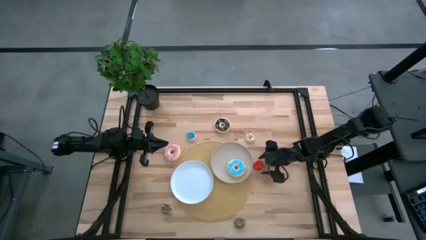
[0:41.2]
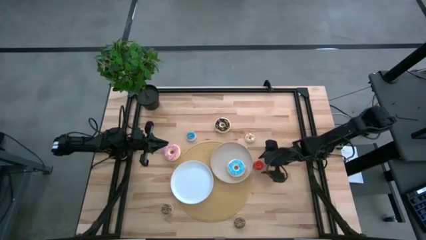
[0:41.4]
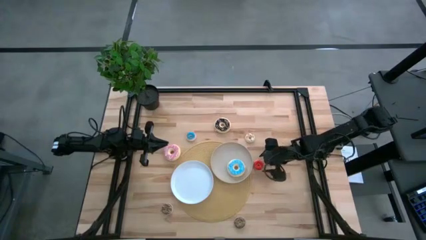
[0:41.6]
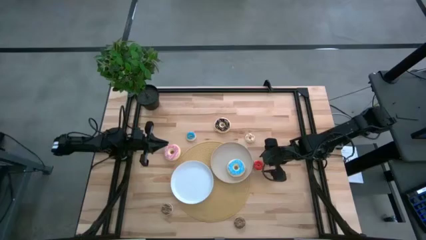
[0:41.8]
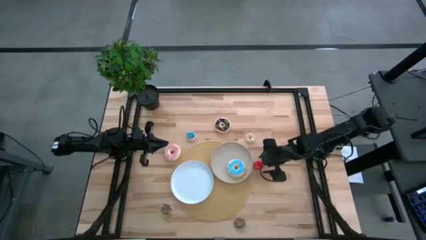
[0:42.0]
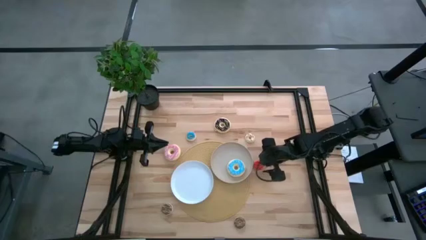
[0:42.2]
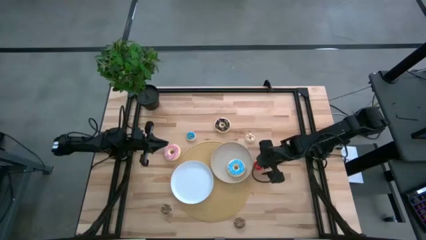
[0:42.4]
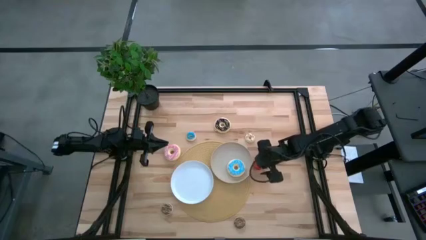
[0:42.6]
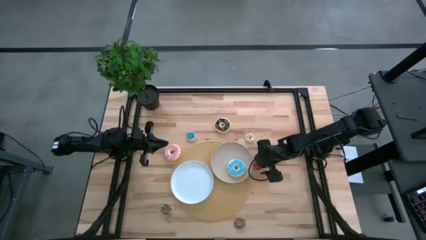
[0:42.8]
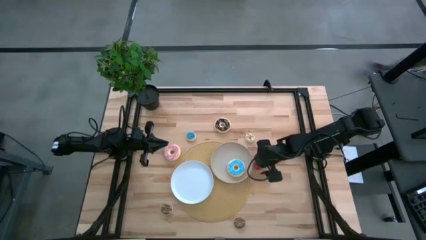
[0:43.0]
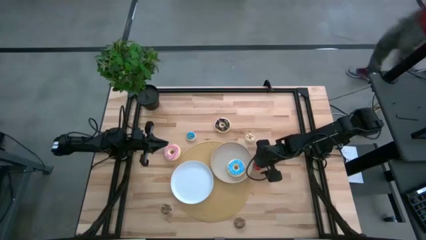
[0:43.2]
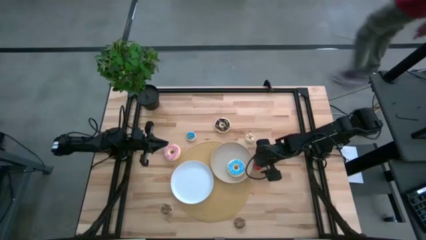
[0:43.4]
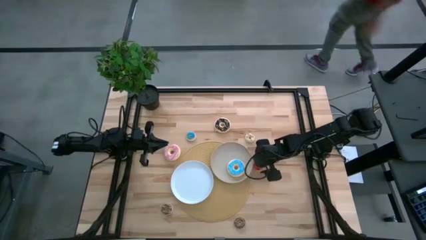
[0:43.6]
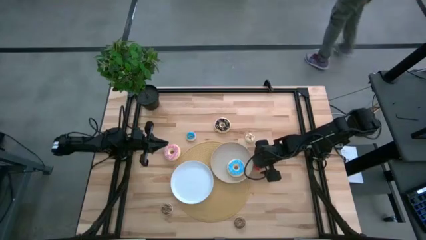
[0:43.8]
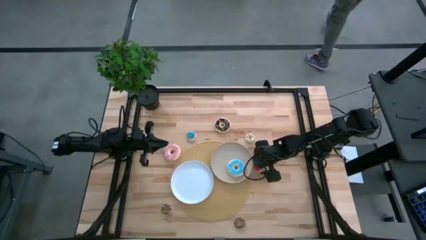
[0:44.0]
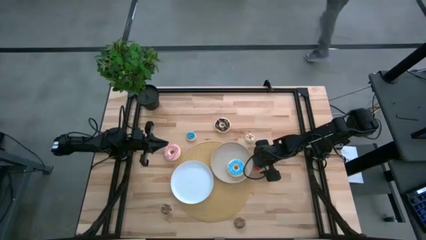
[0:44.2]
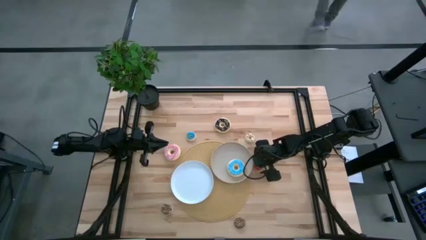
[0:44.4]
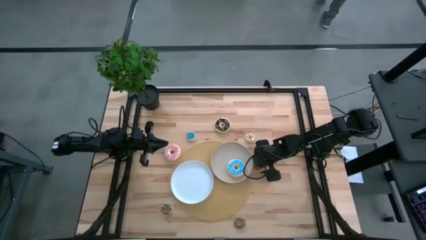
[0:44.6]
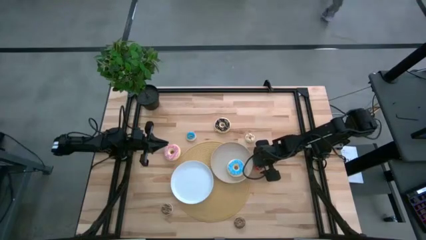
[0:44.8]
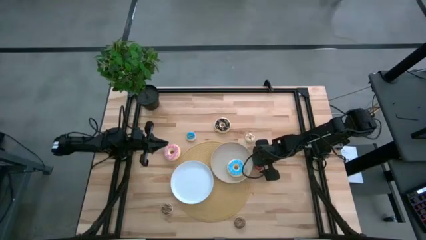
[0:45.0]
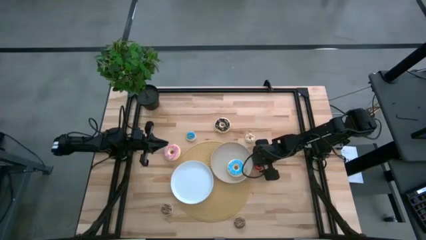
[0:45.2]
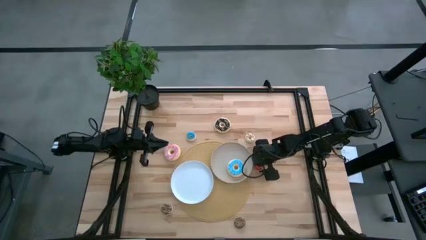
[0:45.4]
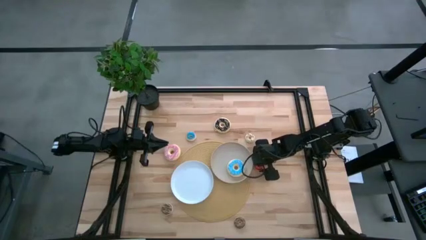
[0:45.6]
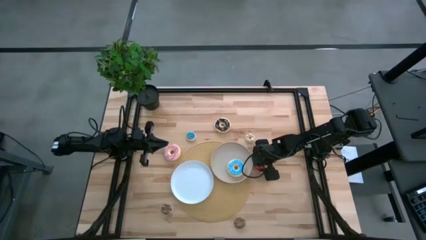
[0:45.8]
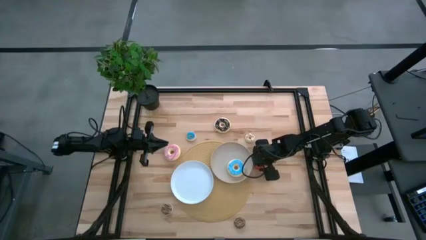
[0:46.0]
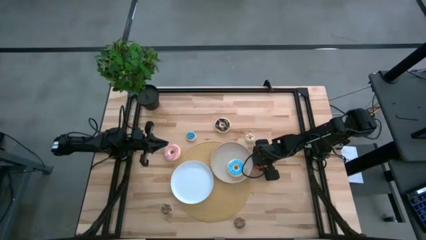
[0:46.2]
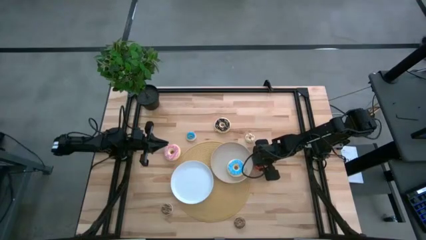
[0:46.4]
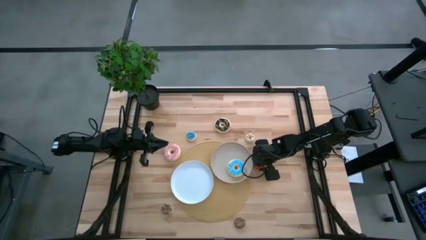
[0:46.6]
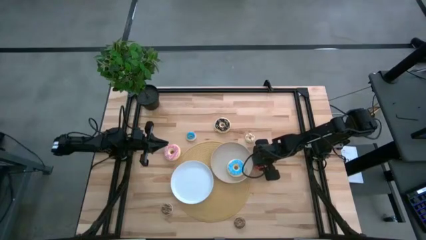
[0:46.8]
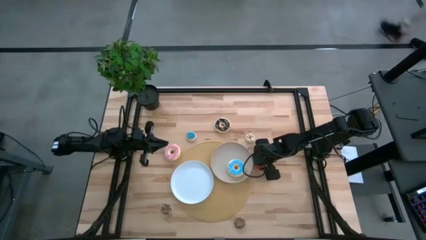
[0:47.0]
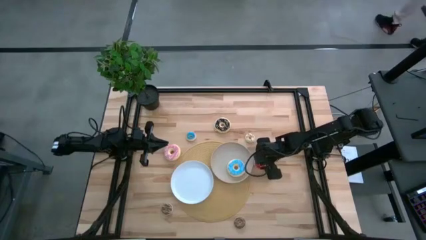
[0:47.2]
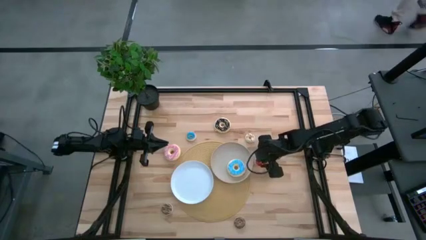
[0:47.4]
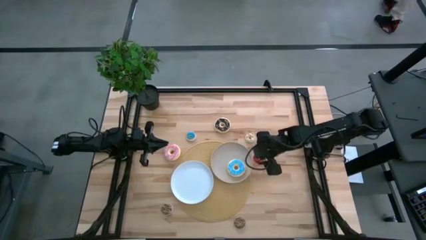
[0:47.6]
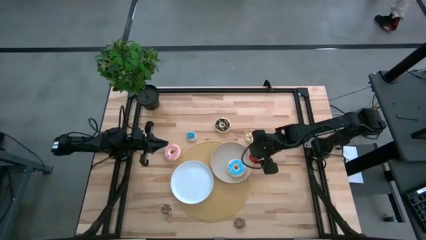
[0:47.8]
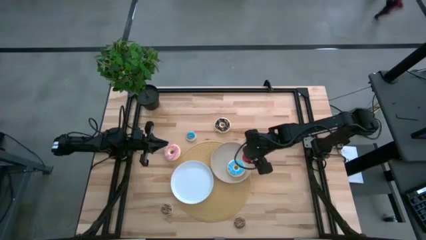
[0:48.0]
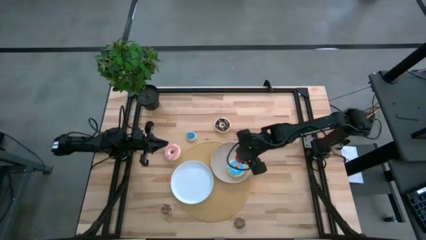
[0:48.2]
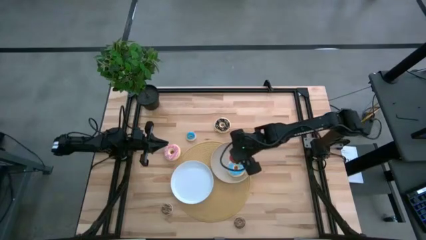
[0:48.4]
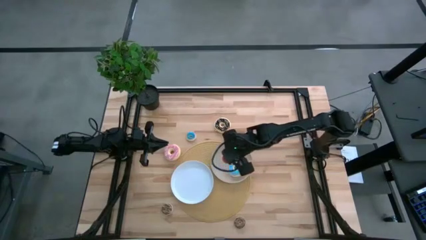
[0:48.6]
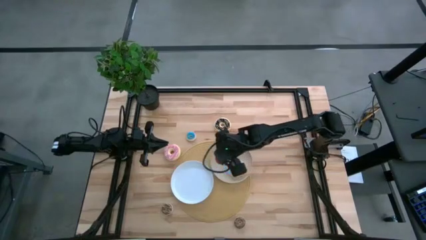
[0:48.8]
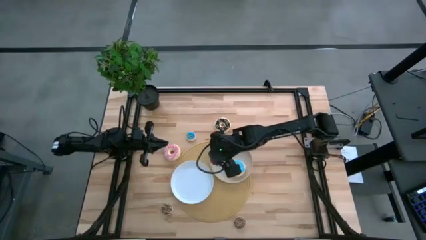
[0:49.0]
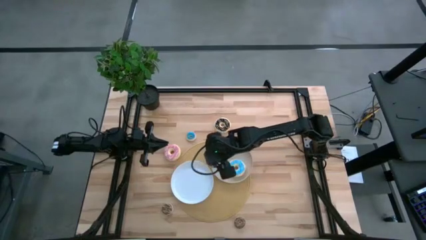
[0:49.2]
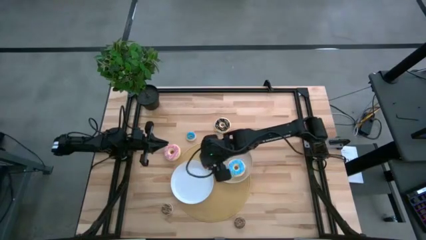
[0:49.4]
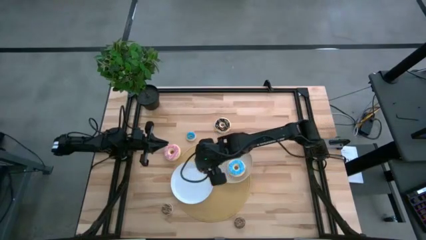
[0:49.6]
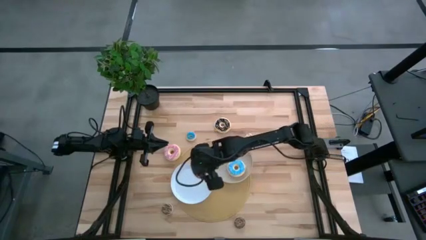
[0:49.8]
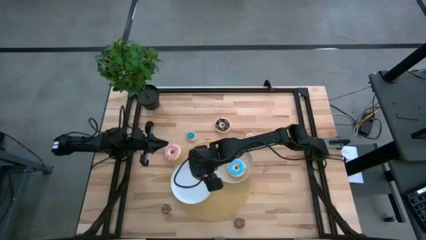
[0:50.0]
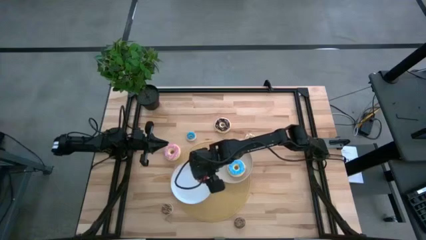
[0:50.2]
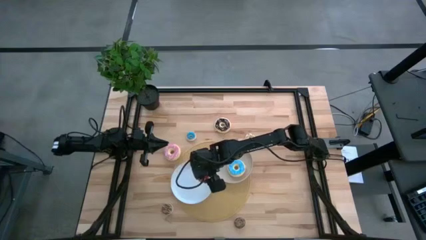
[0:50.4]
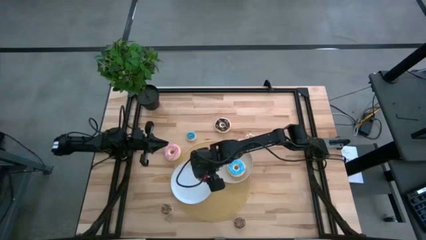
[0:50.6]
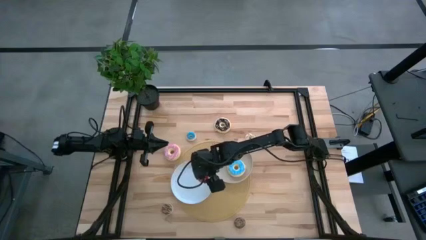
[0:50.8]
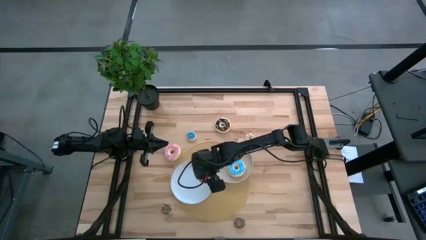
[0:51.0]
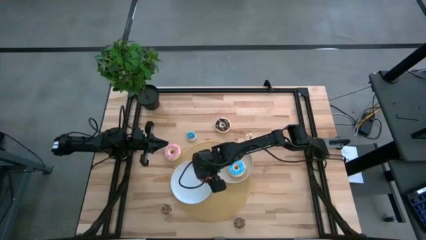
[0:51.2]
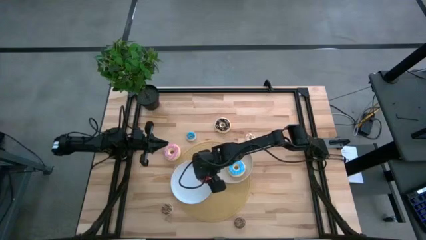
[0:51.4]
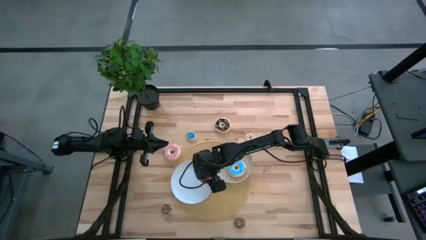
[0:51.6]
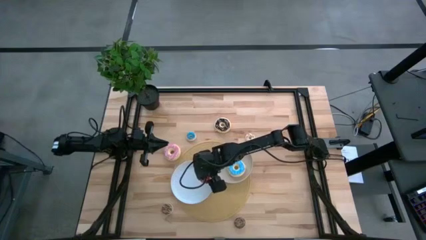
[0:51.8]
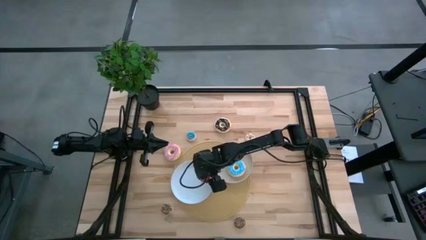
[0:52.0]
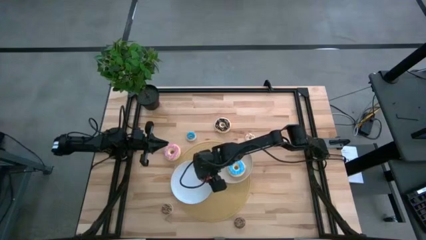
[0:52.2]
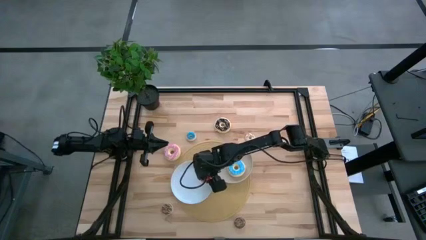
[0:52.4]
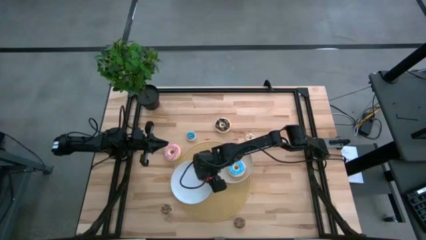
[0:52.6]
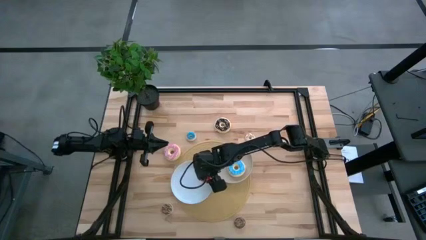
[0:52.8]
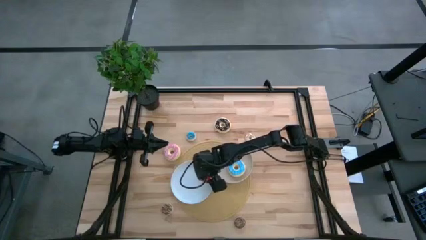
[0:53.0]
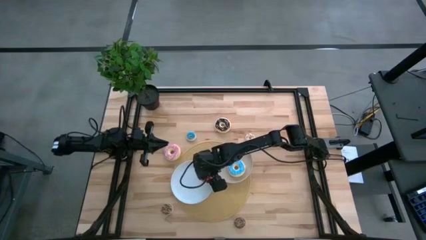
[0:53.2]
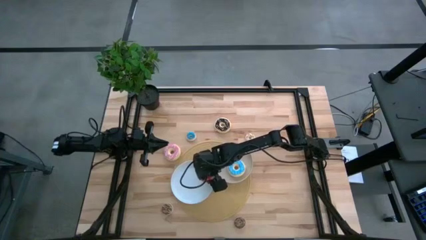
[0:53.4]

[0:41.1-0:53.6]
Task: Pick & Place donuts
Put the small red donut on the white plate

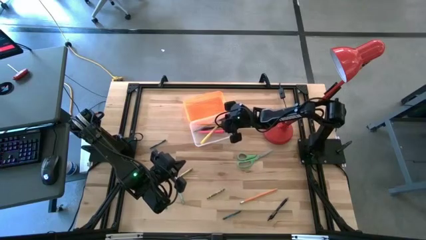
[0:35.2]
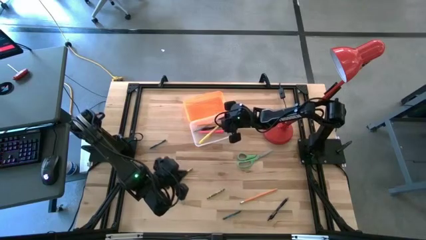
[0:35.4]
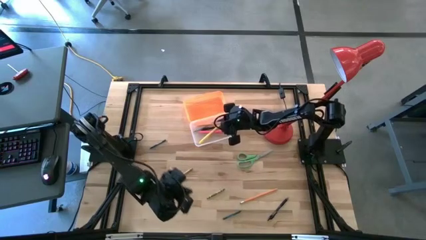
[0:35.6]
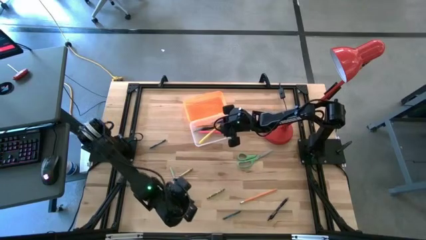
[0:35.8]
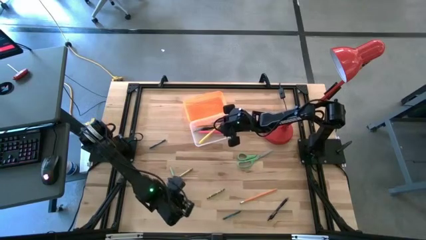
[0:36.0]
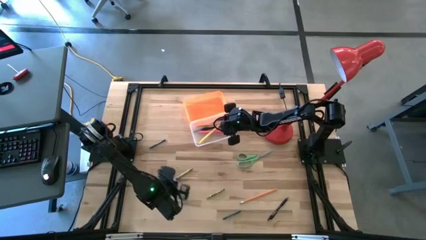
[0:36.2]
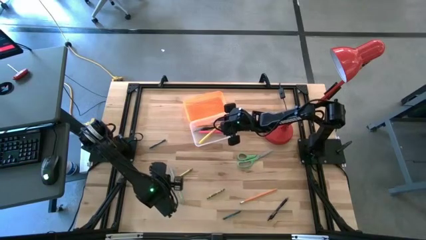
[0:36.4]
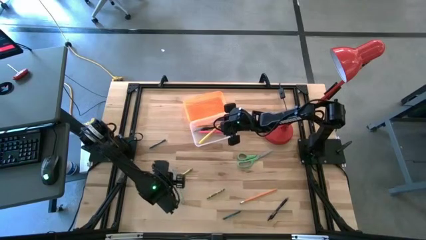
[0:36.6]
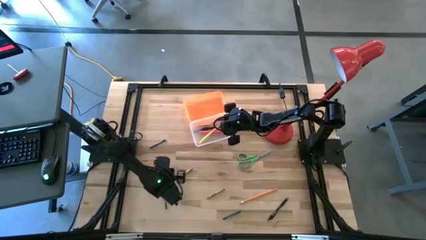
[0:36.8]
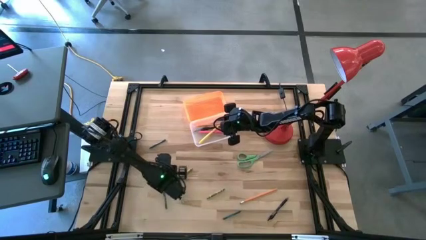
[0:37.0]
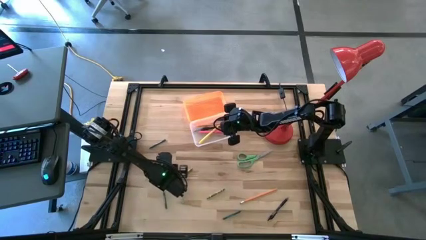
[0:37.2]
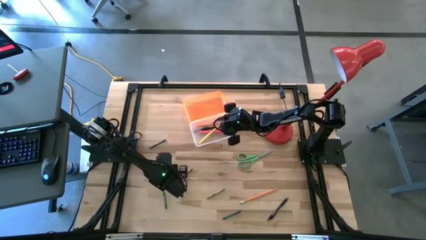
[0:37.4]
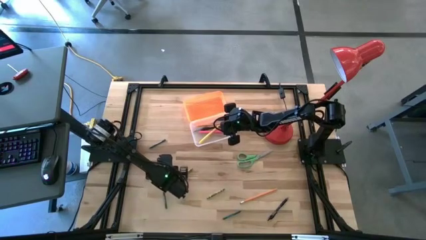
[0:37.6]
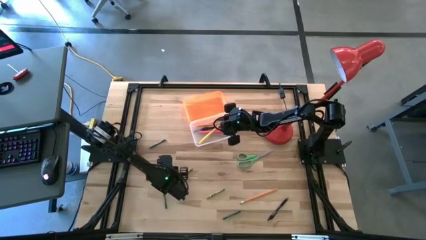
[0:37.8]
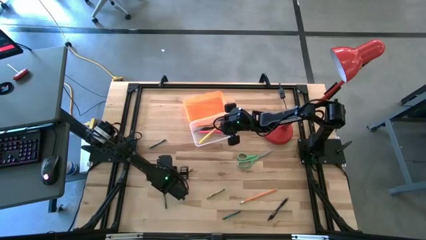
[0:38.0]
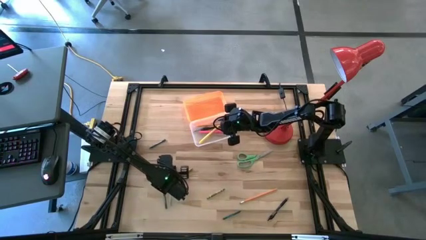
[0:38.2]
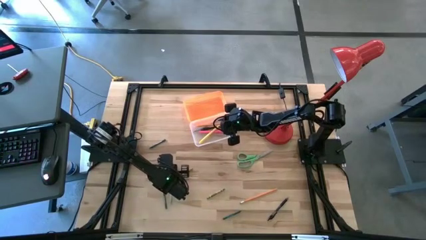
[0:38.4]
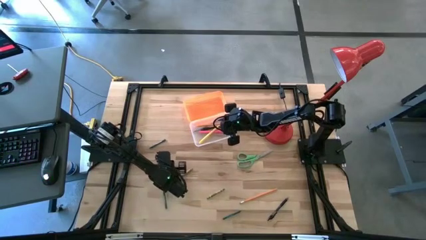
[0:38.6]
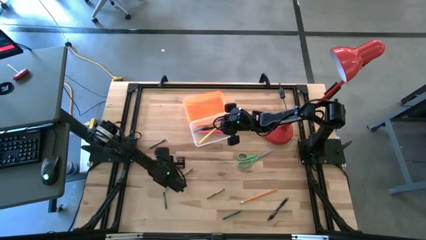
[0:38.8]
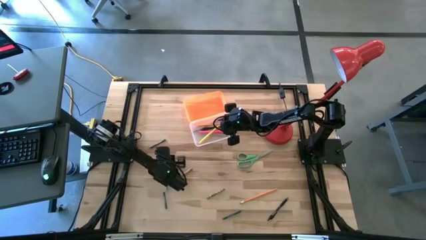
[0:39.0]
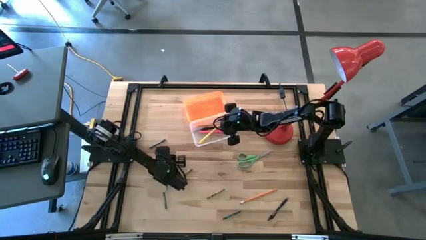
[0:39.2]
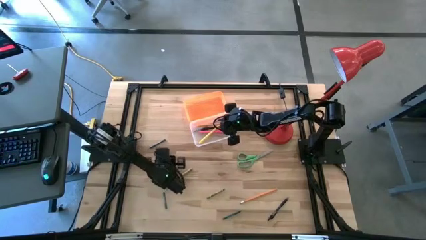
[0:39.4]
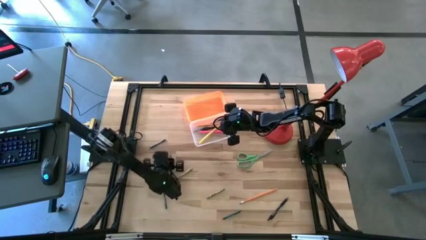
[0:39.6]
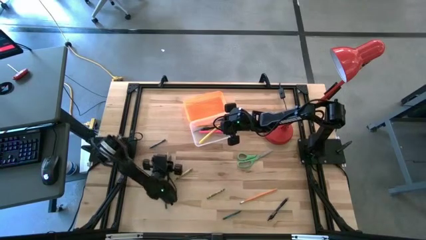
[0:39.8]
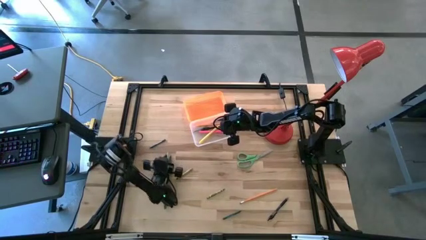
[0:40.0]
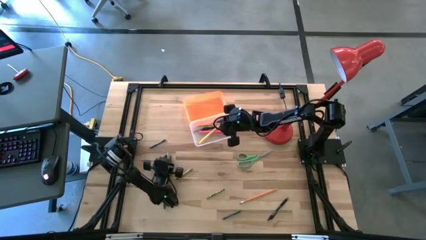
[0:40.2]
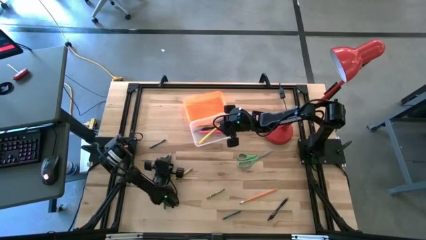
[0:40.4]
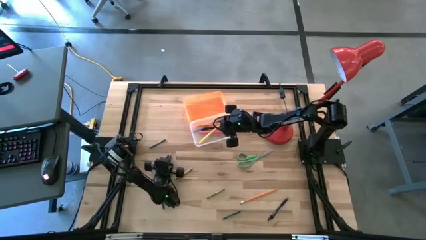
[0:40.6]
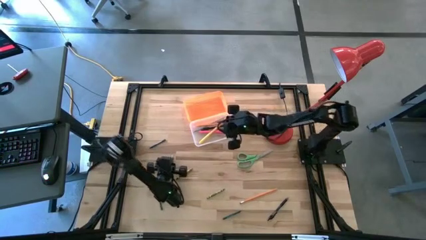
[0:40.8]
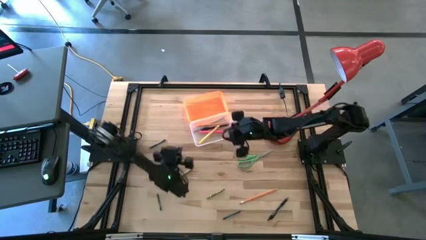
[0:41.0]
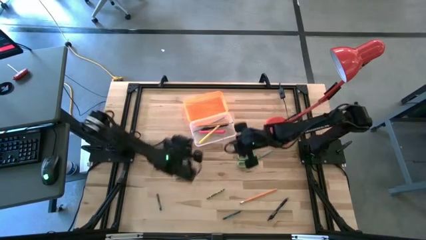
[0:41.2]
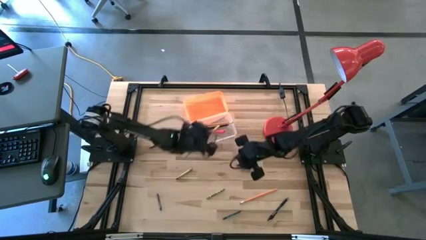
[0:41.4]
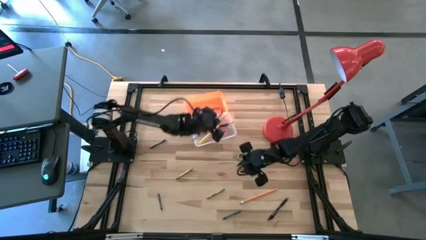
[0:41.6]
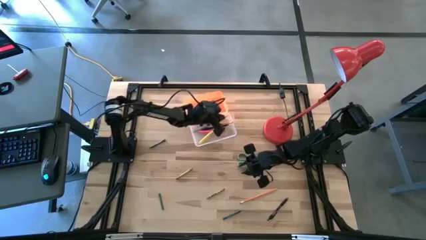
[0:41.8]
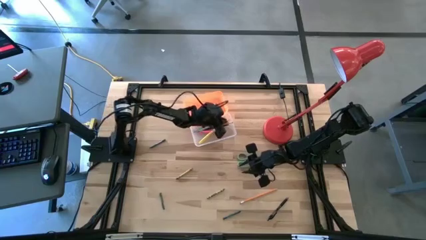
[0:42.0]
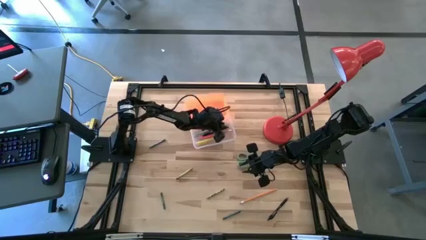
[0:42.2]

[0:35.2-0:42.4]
Task: Pick & place school supplies into a supply box
Put the light blue pencil into the orange supply box
